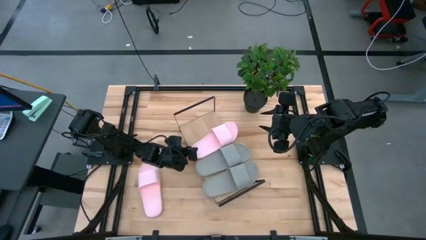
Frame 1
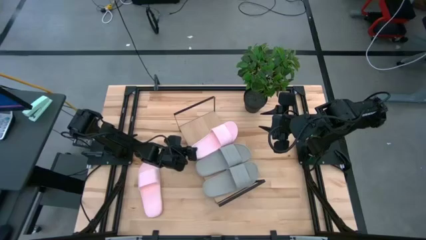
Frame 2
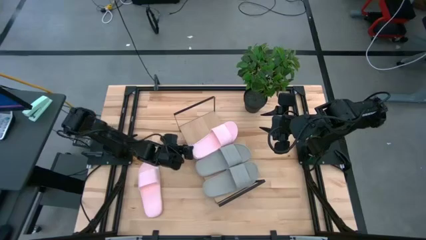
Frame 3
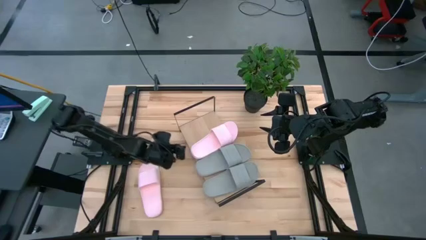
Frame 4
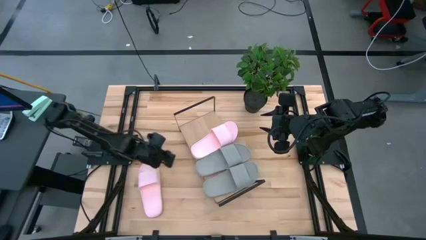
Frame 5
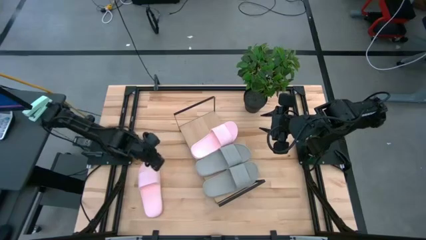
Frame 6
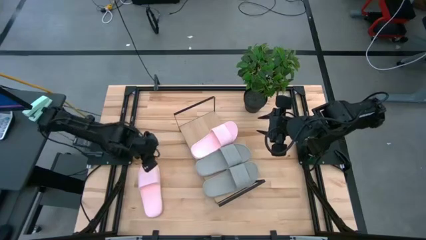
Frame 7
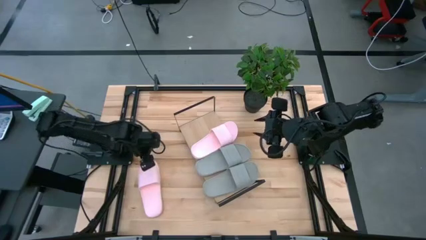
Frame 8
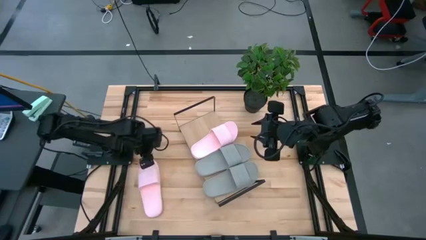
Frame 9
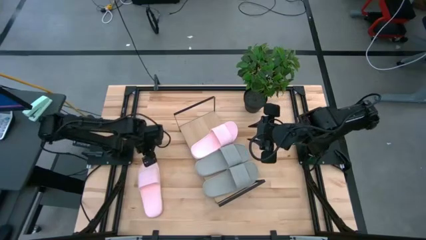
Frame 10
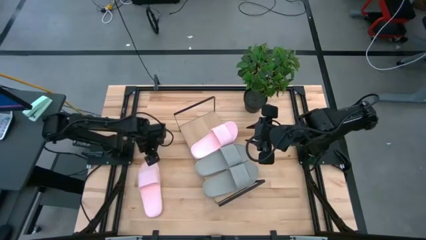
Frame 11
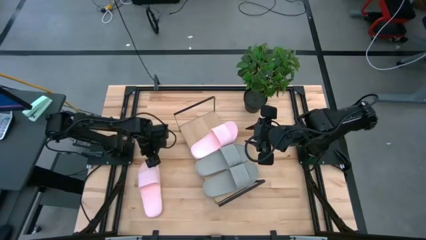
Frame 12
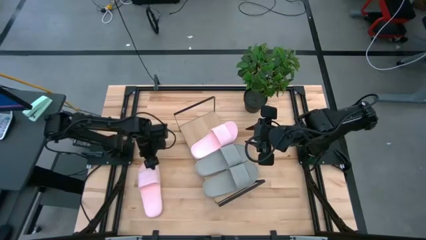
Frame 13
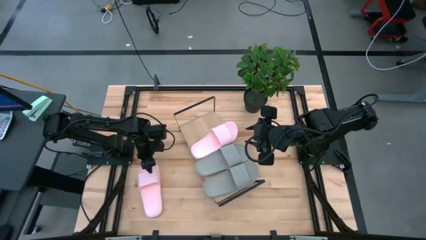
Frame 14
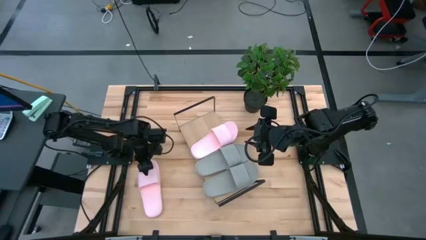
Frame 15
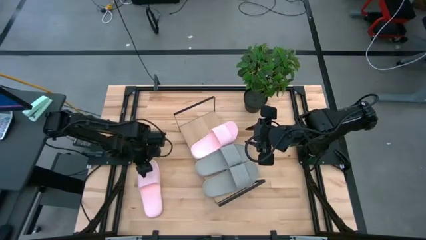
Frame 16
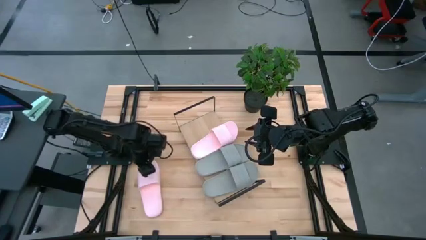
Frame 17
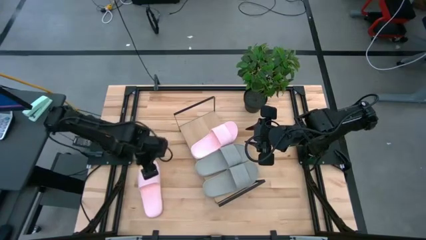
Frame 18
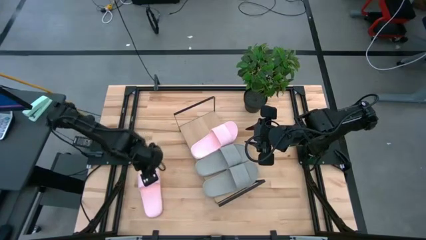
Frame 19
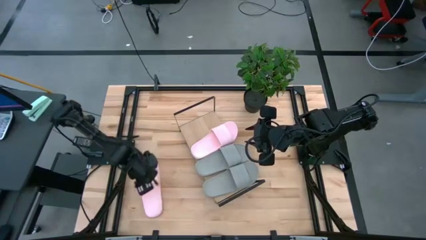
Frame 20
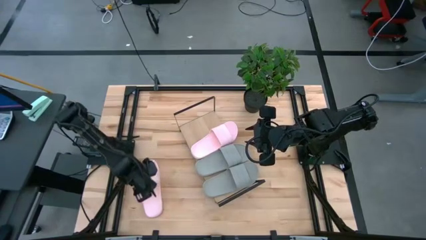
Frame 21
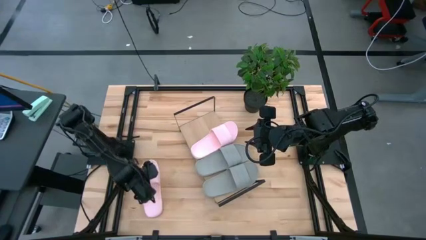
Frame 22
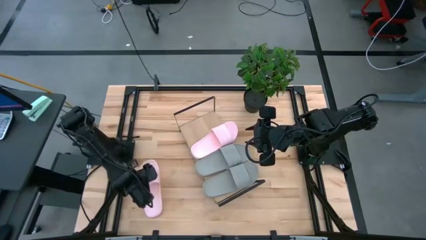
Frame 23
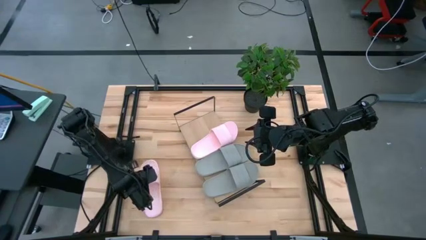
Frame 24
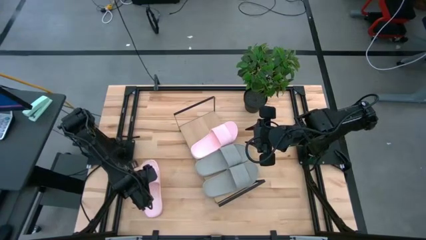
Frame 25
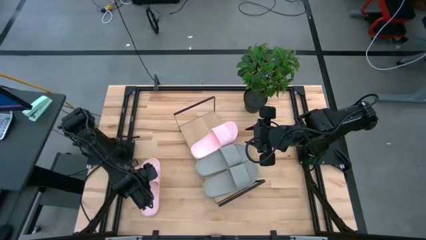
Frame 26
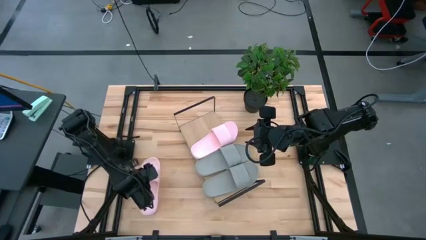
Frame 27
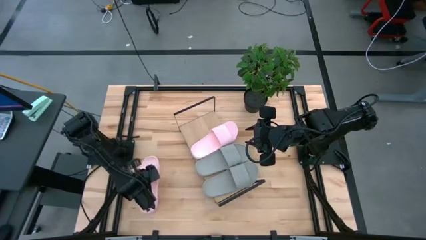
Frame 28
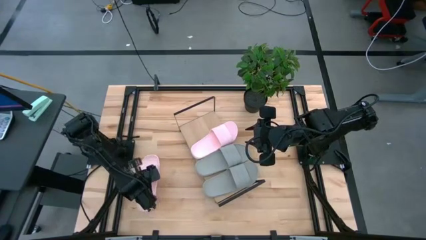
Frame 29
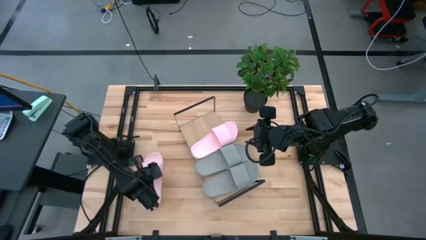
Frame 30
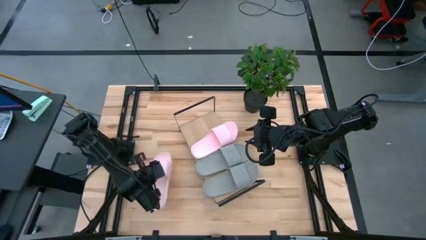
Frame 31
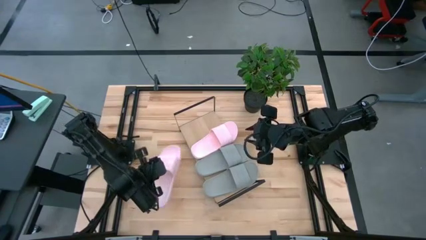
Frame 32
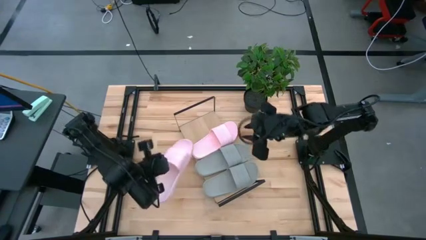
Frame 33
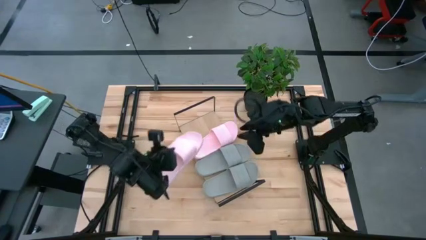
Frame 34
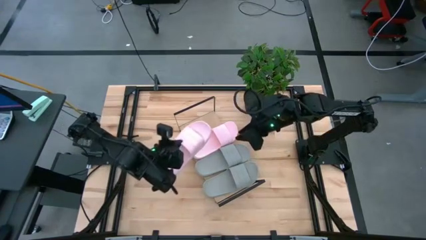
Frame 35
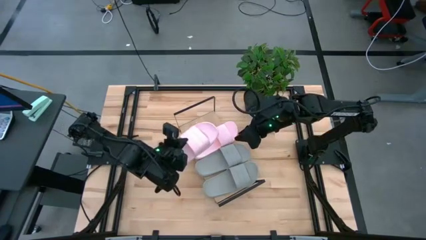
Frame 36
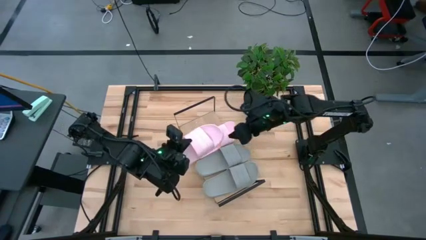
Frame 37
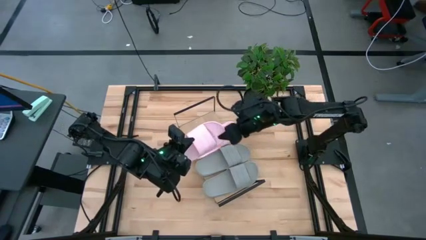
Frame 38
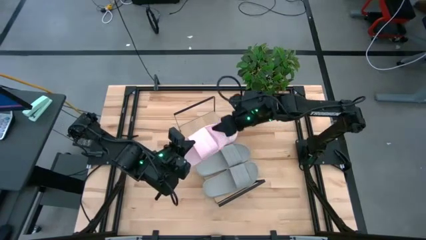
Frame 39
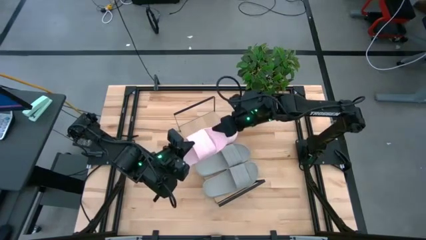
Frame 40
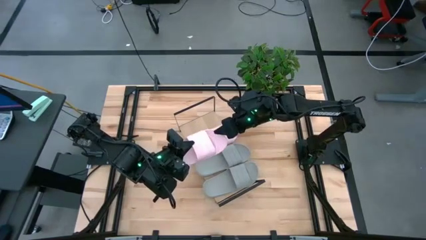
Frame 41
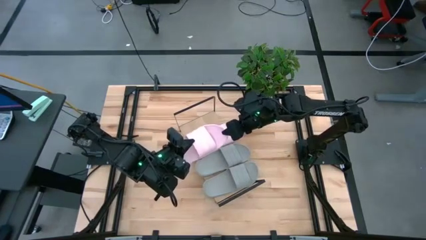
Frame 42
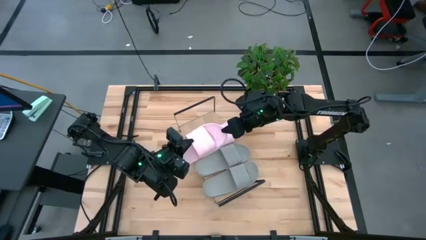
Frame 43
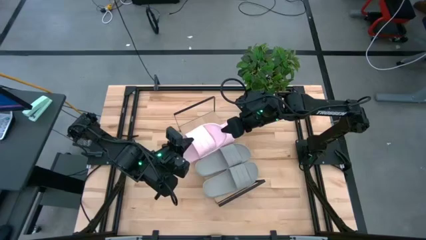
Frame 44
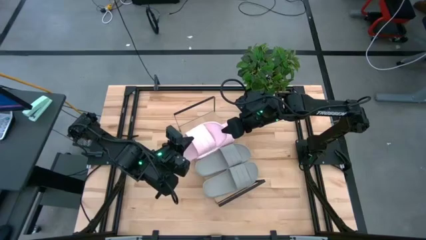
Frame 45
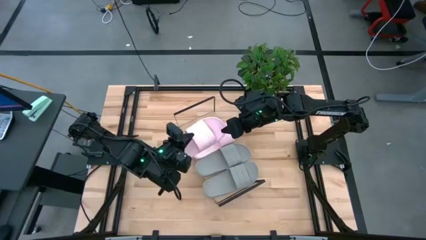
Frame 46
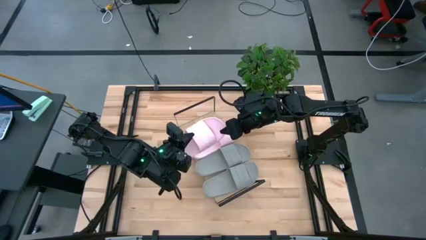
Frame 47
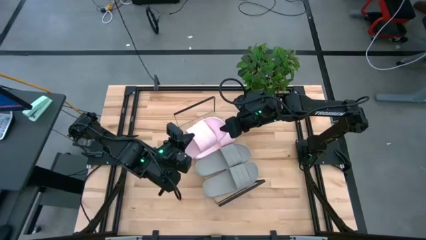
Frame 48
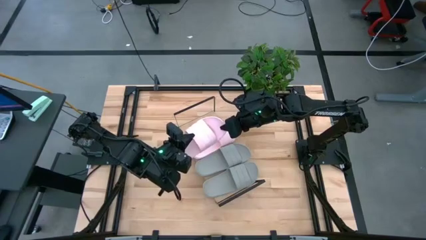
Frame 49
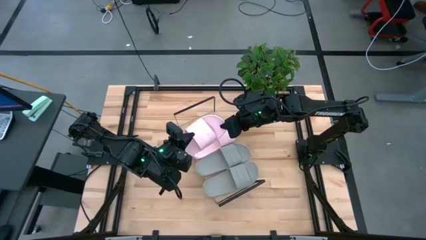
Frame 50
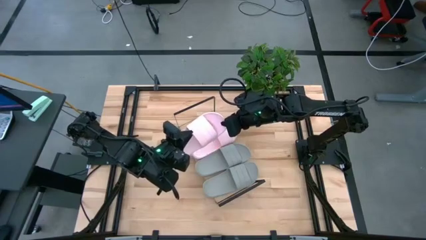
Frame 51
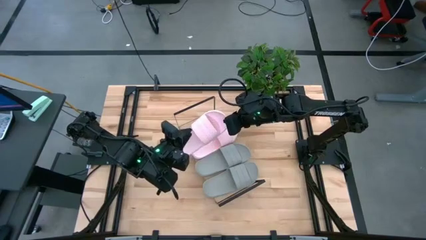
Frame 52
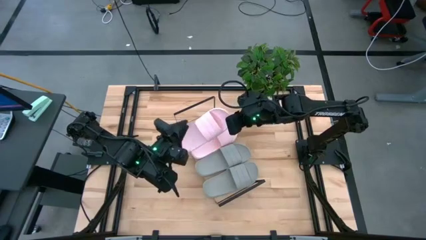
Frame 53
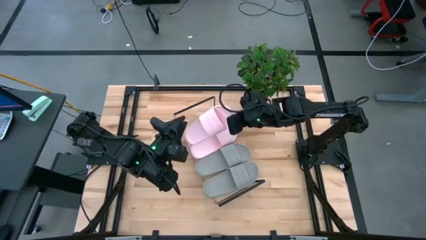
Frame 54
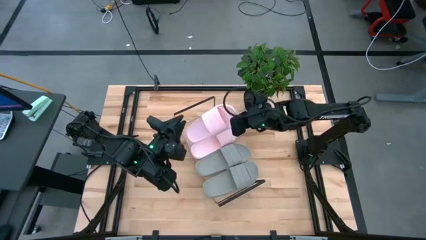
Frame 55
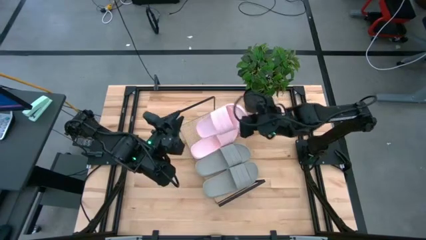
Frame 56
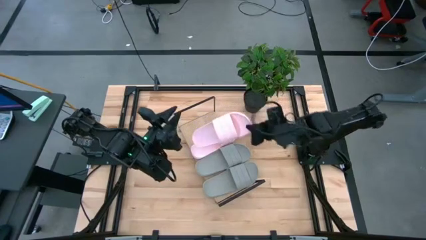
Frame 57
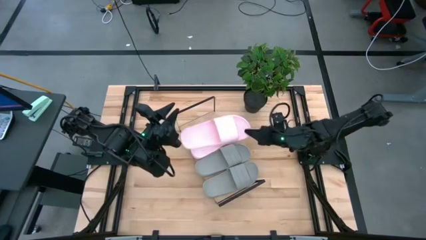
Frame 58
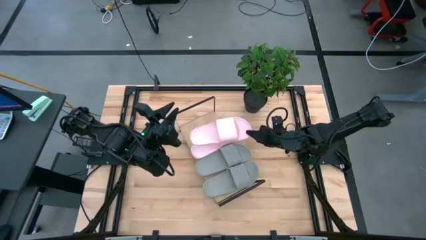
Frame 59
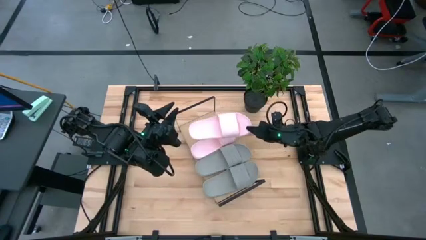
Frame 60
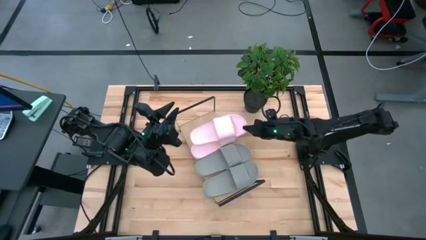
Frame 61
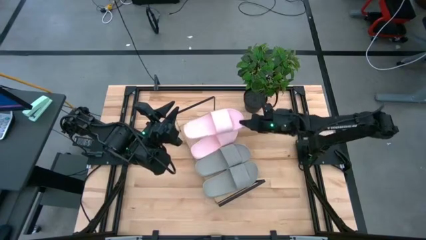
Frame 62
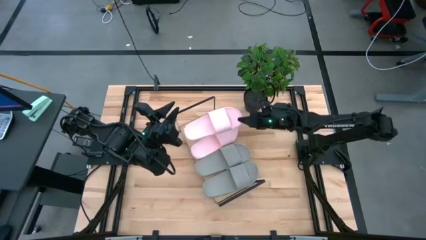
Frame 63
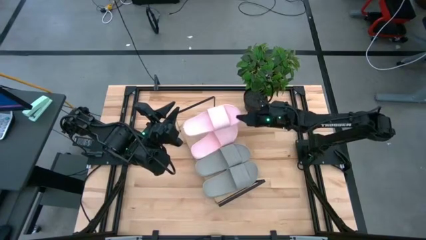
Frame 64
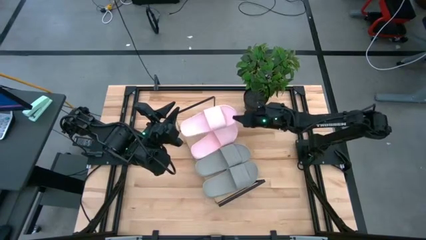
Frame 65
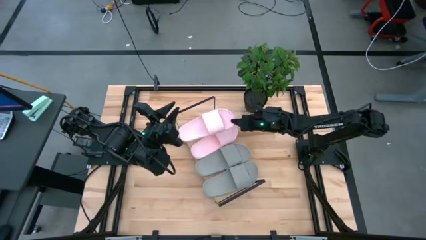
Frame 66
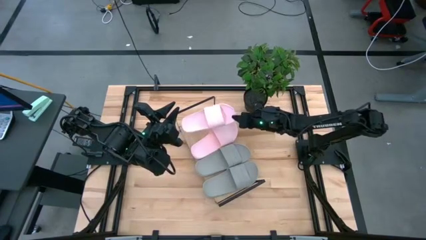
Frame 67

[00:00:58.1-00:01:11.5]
Task: Pick and place slides into the shelf
Put the pink slide on the shelf
